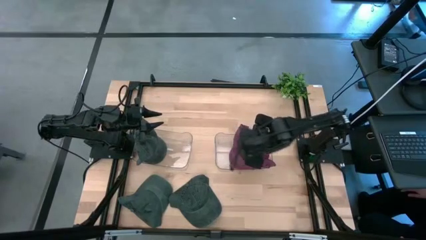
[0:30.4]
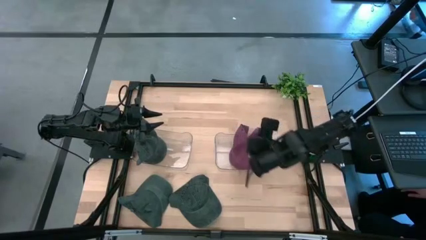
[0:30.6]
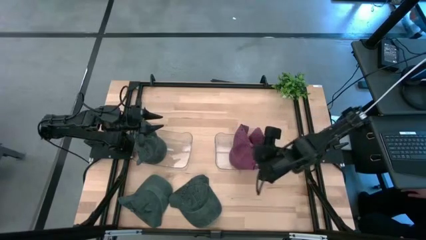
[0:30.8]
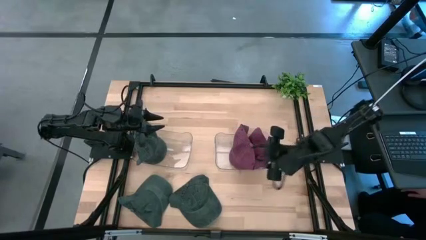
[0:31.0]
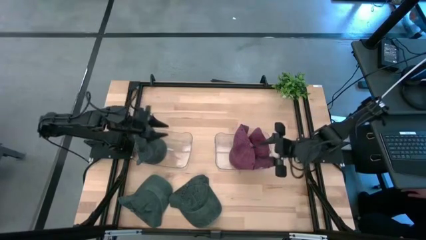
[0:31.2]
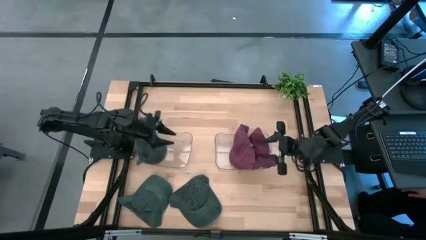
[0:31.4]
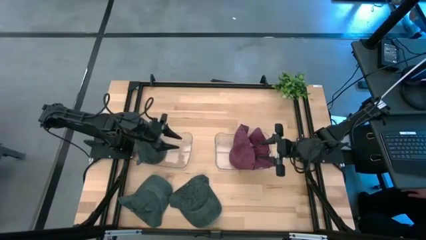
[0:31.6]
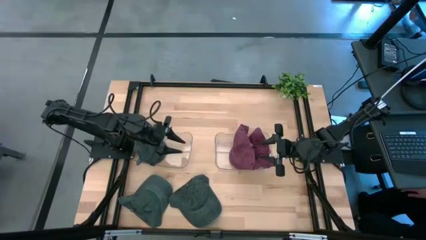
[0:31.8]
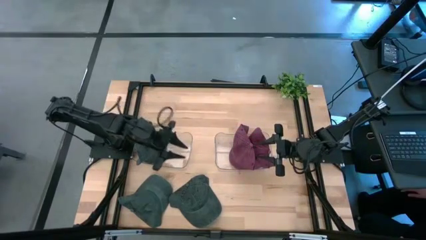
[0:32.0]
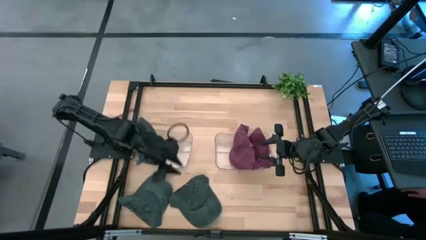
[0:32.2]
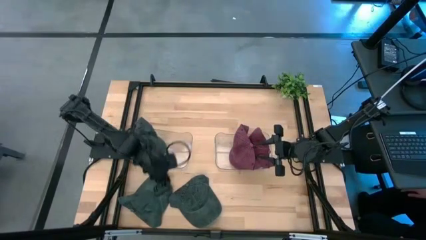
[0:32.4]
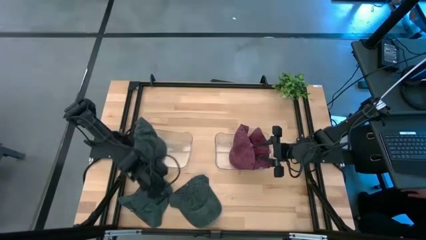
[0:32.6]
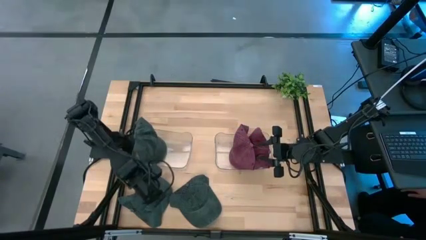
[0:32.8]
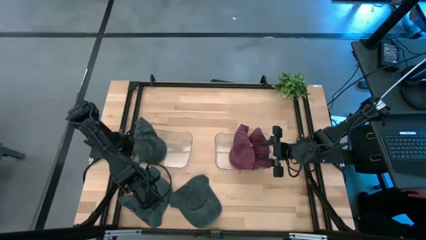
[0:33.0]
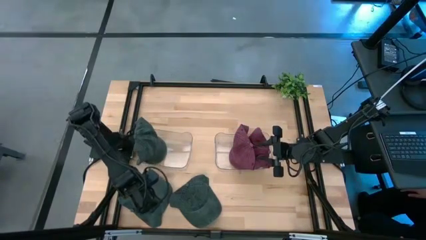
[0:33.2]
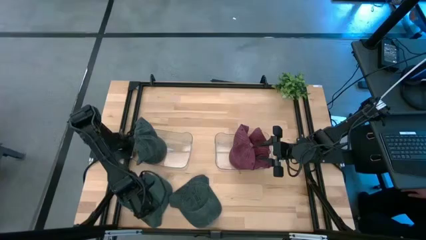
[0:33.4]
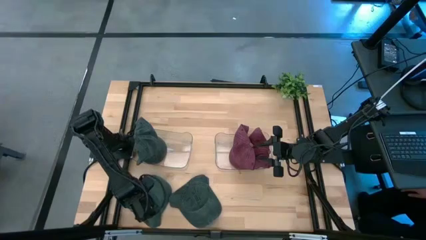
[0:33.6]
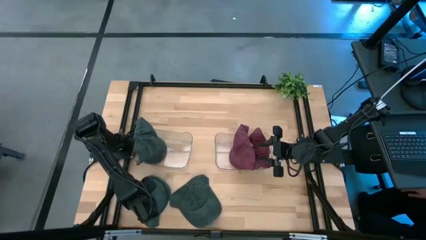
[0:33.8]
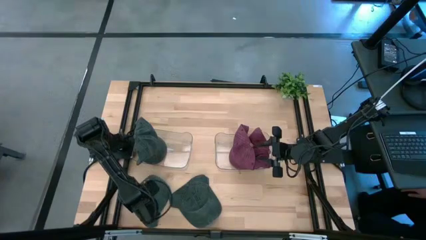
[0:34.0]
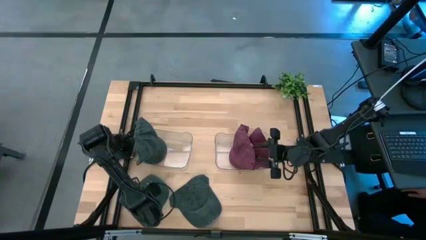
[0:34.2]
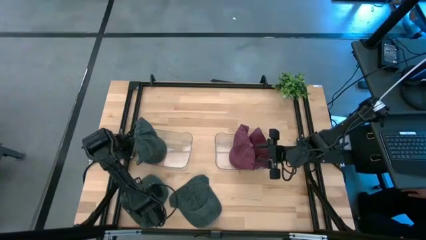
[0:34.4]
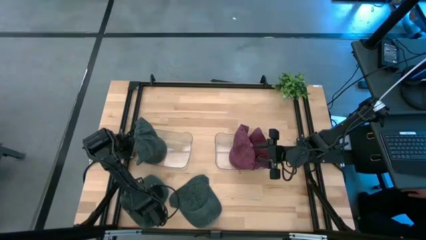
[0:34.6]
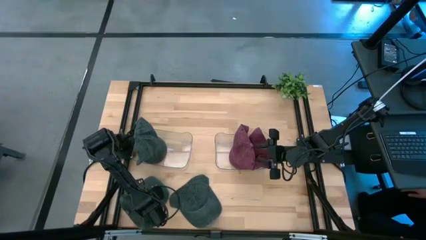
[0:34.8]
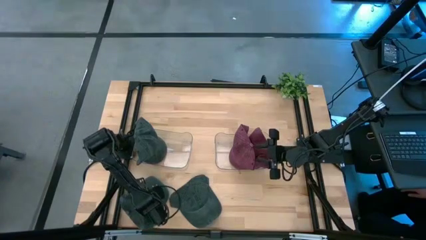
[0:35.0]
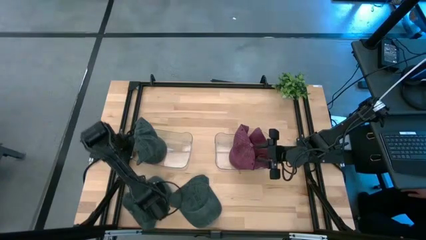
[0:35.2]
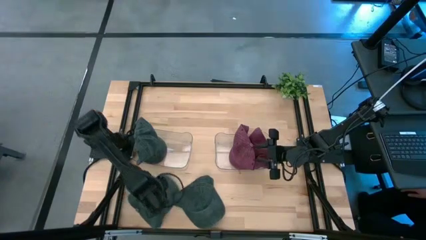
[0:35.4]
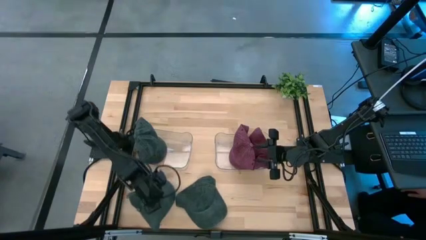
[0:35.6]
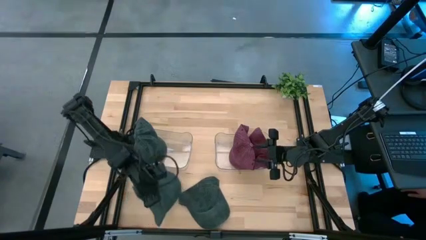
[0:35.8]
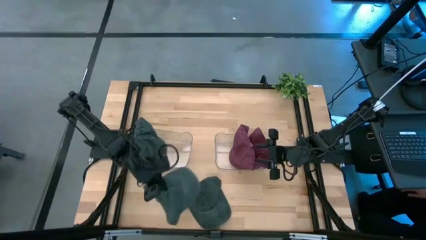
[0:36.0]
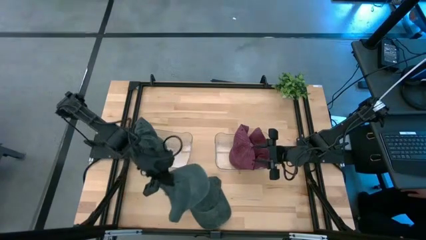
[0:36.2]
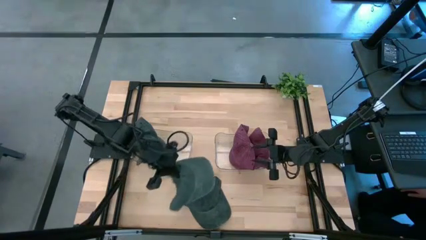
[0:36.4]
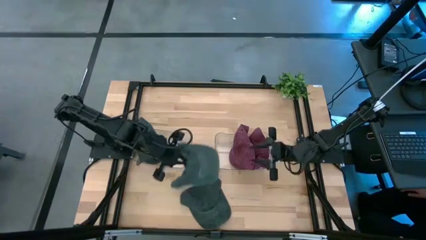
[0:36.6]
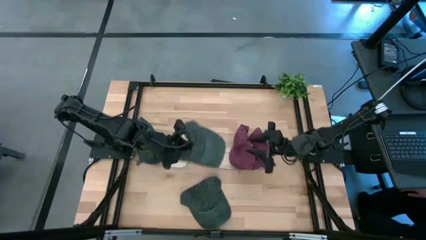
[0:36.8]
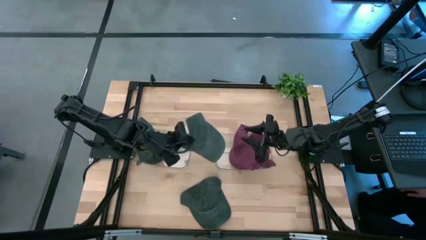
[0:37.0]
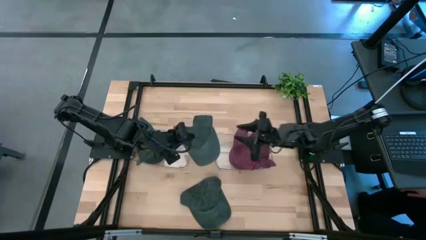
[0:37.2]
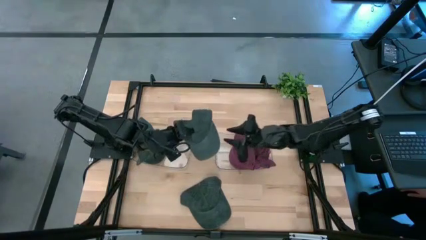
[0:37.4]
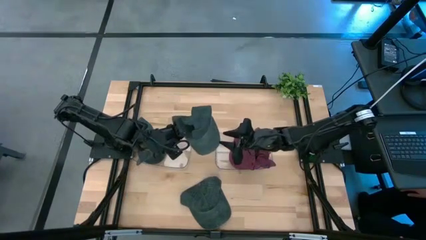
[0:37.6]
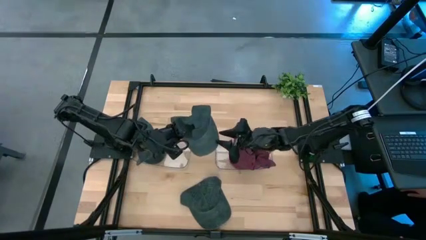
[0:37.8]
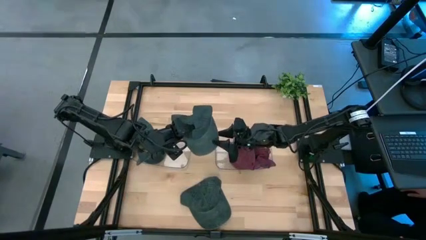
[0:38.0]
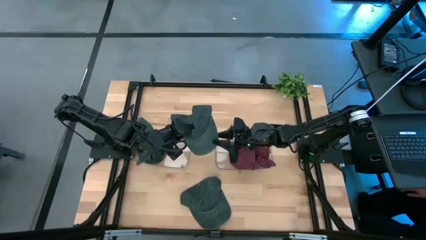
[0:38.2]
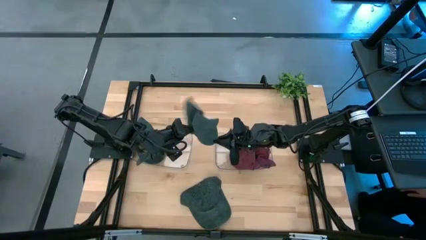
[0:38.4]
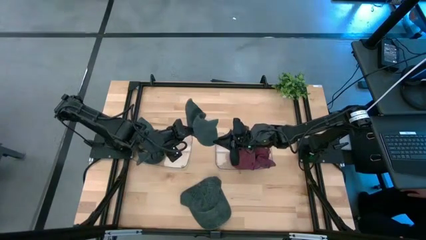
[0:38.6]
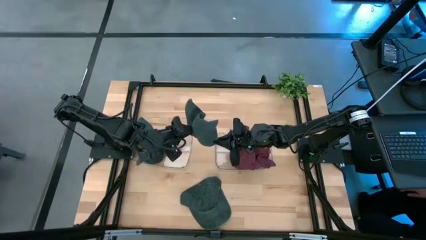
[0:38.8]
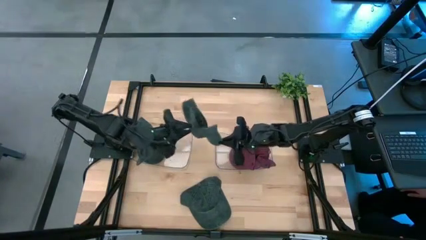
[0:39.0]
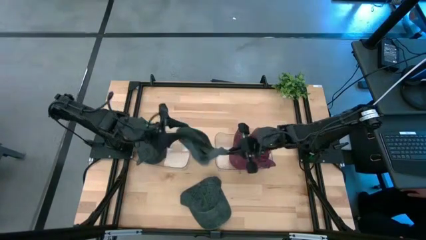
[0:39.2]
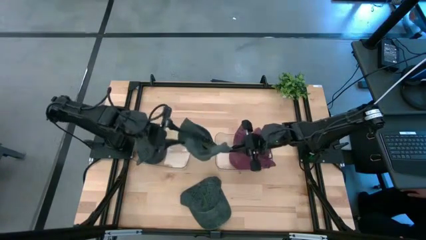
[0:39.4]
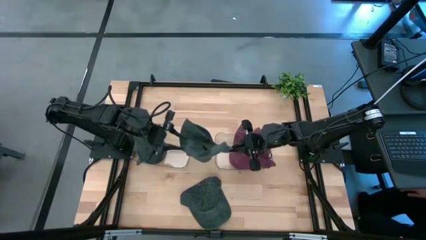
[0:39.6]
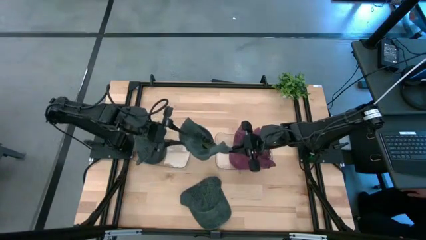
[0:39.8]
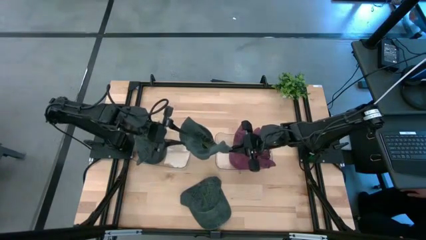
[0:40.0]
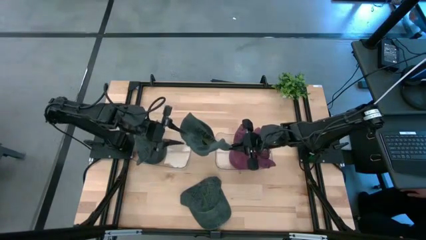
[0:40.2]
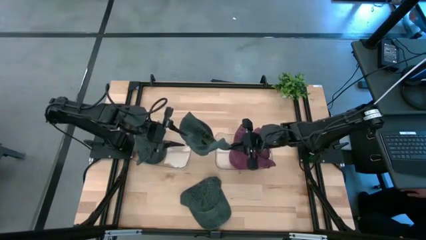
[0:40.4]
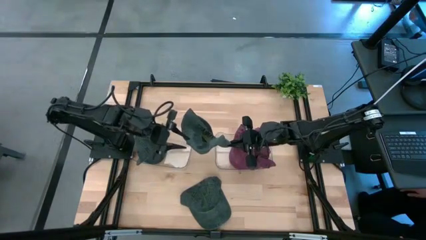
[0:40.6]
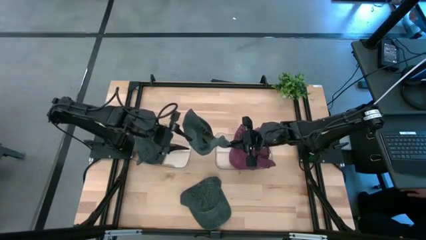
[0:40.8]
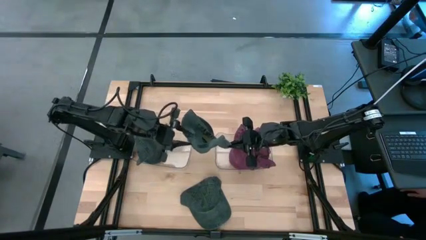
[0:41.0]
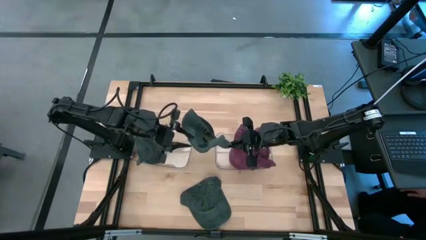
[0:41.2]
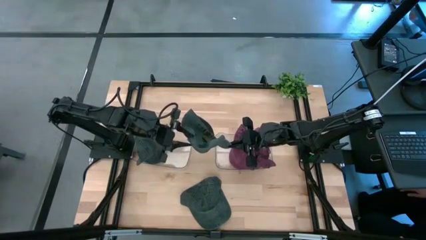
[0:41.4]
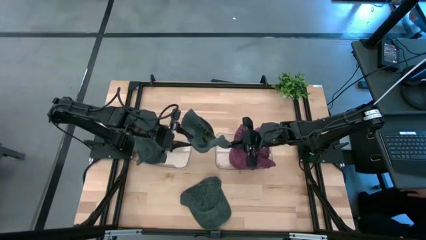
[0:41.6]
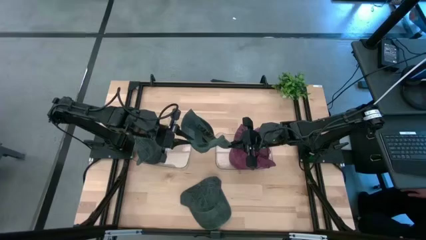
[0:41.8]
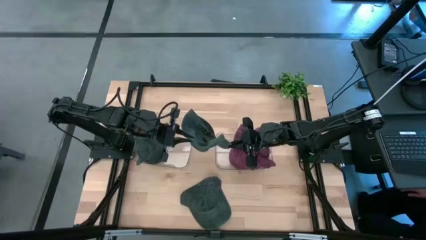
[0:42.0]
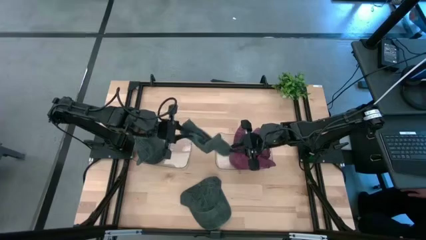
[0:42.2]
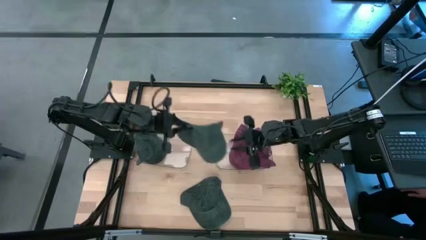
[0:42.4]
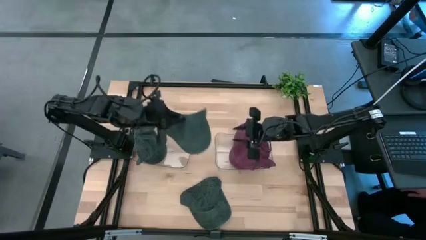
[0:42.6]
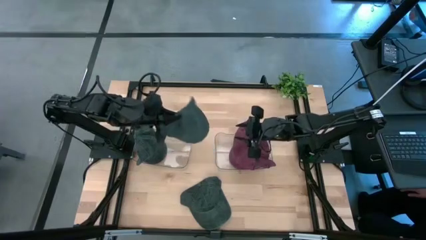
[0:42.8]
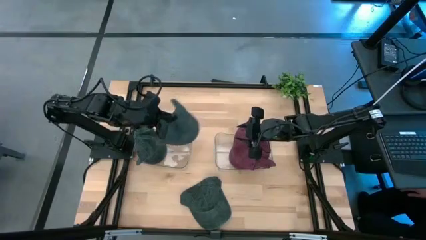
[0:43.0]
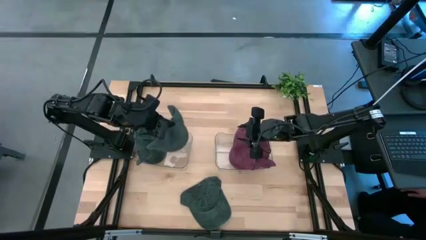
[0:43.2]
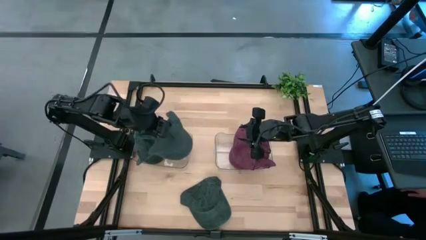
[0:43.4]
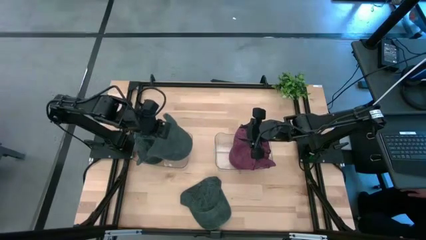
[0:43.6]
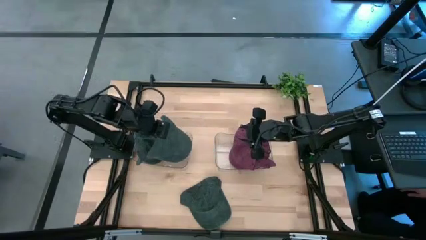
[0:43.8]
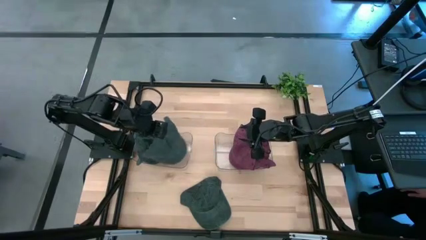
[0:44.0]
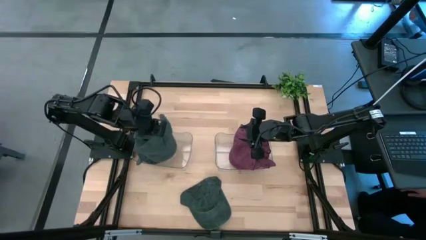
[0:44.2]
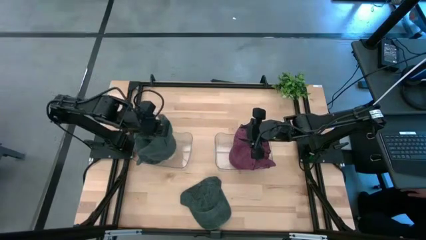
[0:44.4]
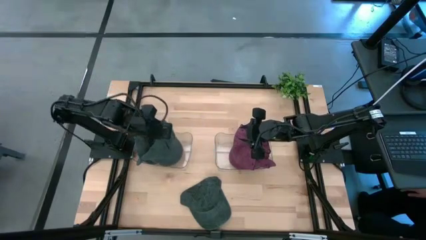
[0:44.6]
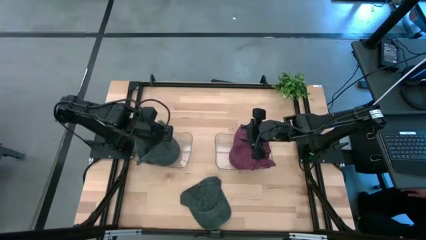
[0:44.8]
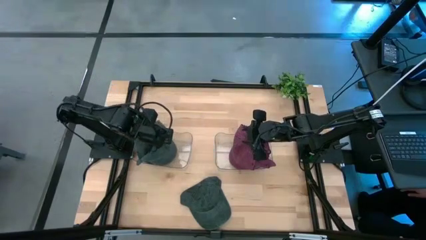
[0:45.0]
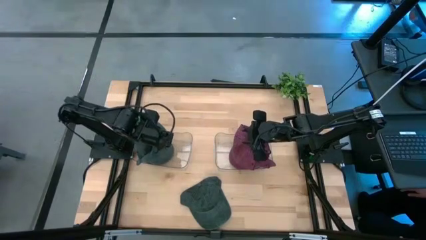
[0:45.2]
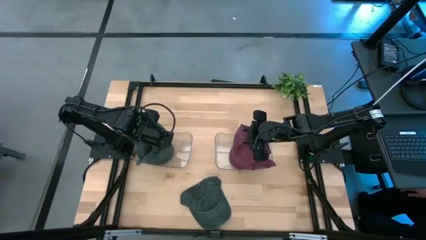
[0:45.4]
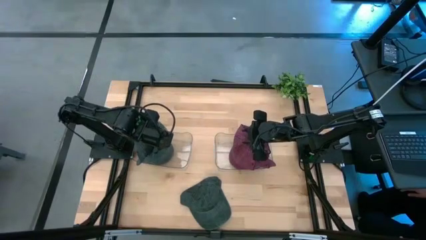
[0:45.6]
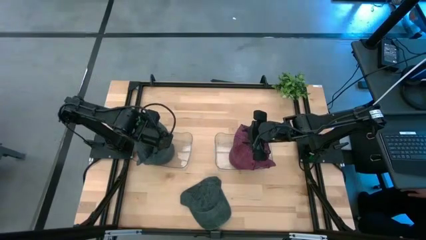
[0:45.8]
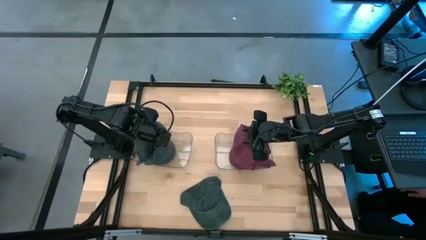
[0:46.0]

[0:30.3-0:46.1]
Task: Pick & Place hat
Put the left black cap into the left transparent bin
